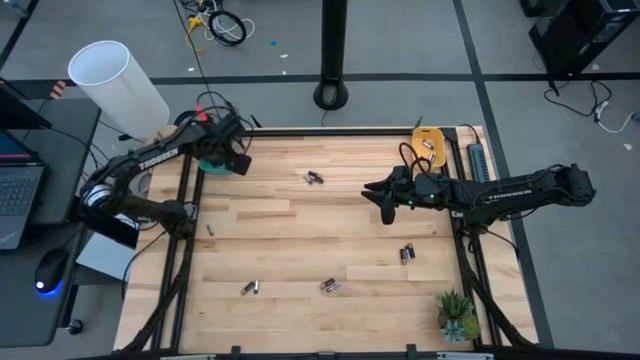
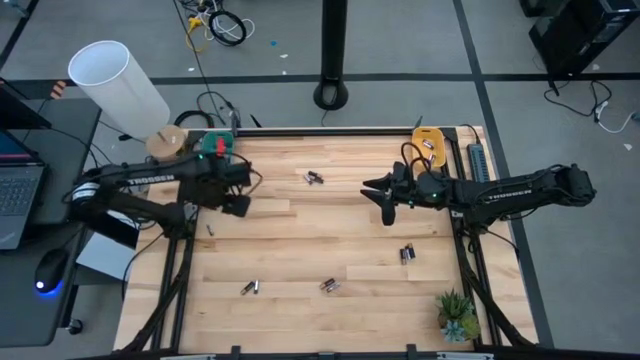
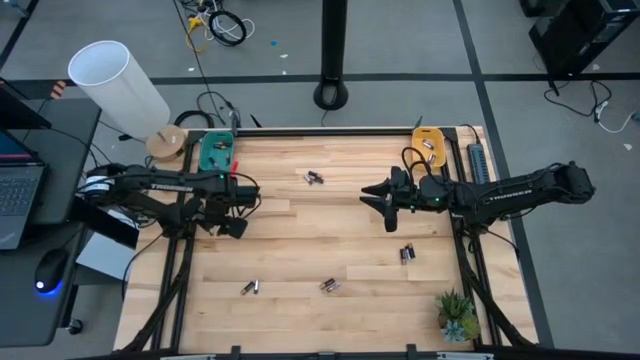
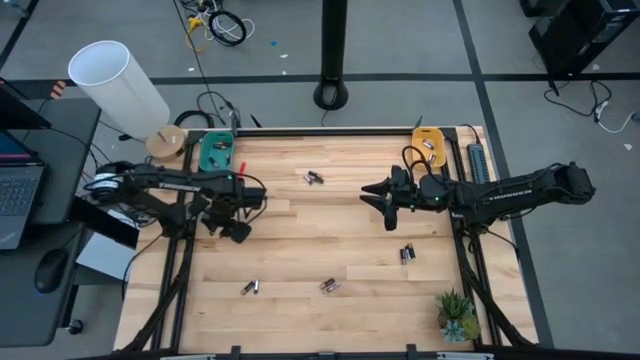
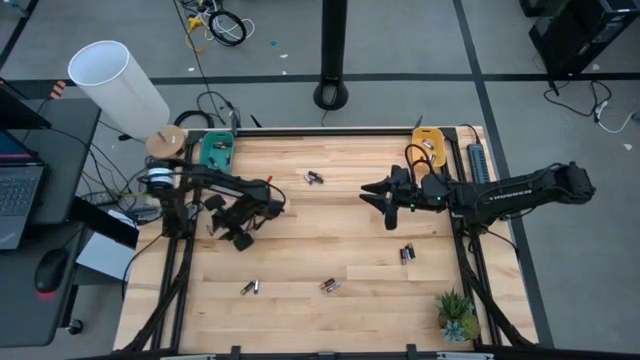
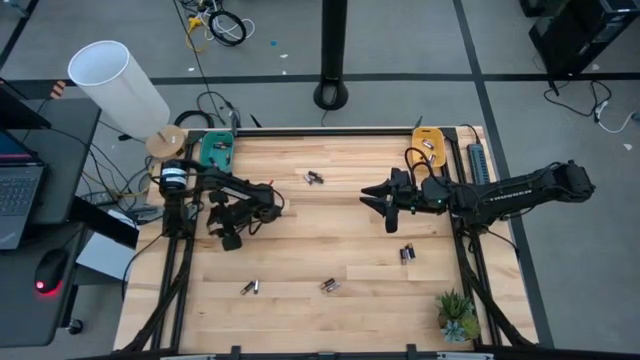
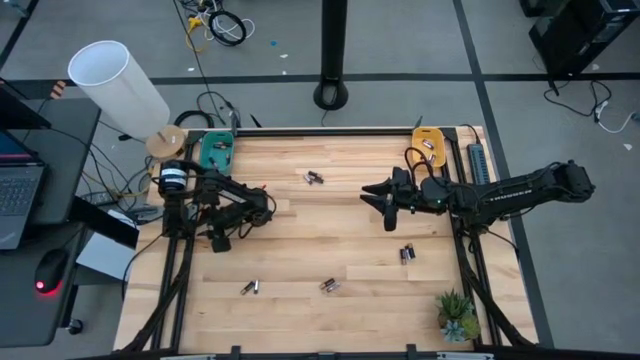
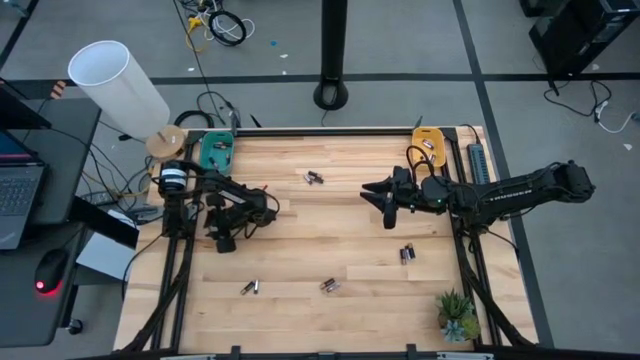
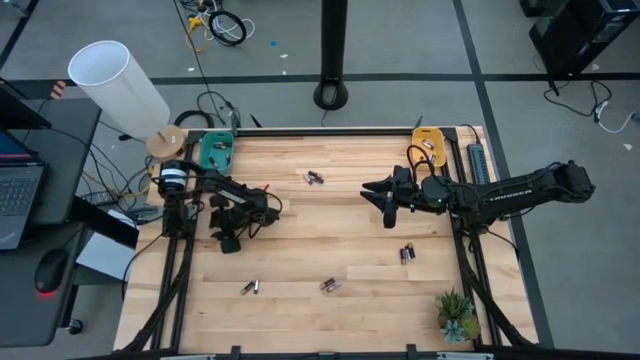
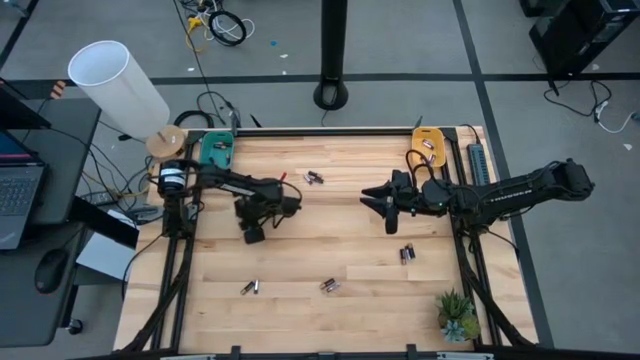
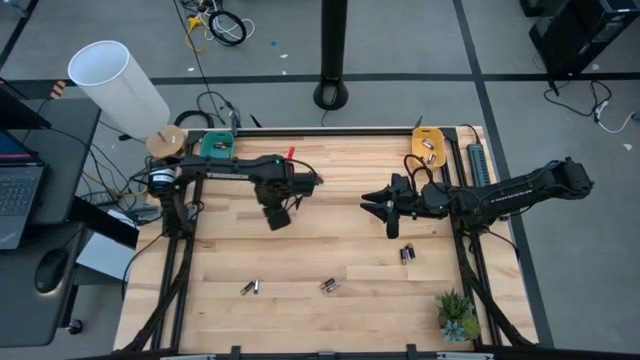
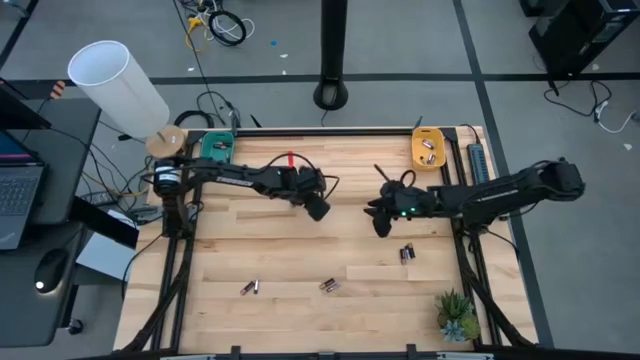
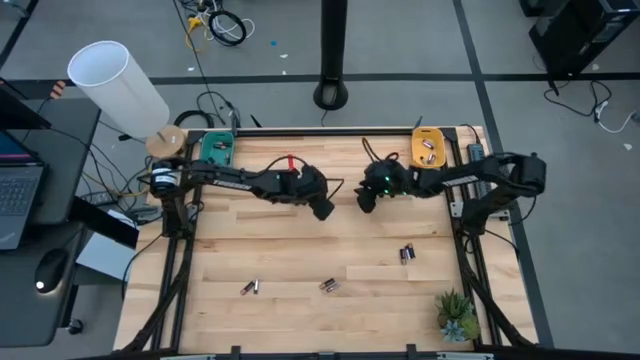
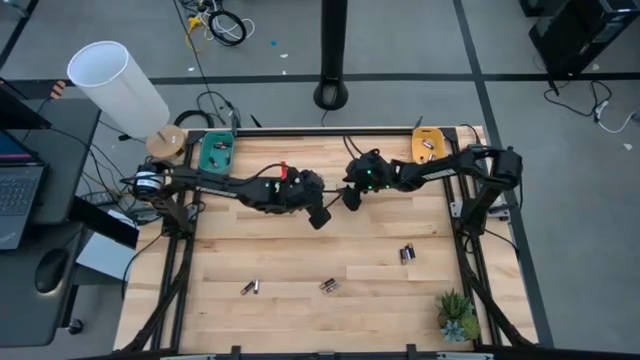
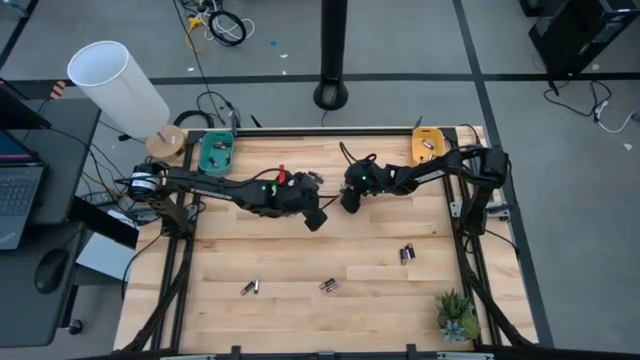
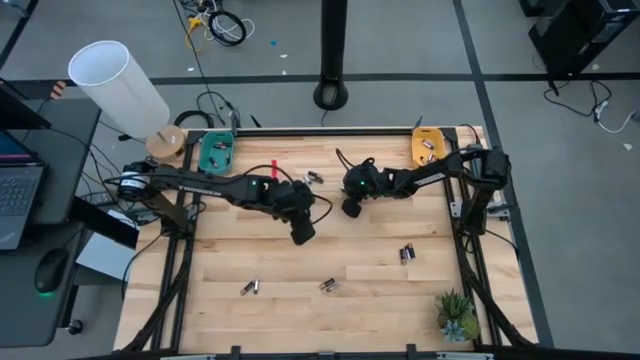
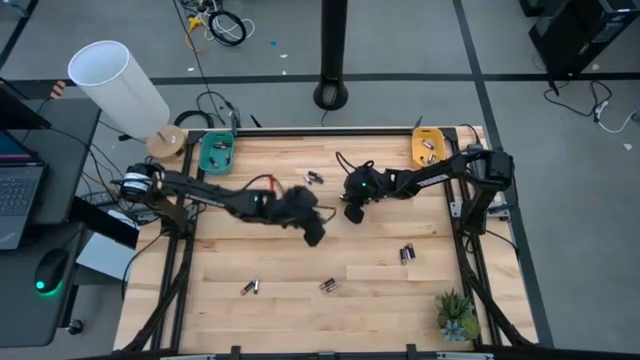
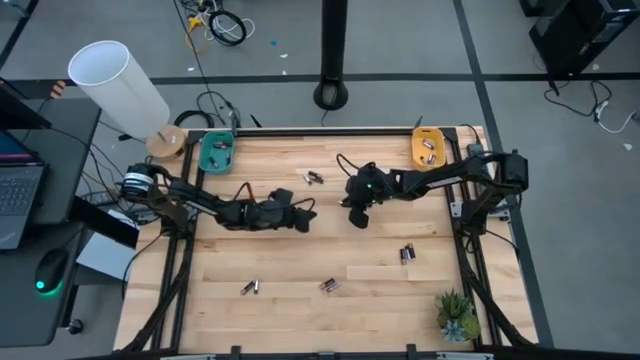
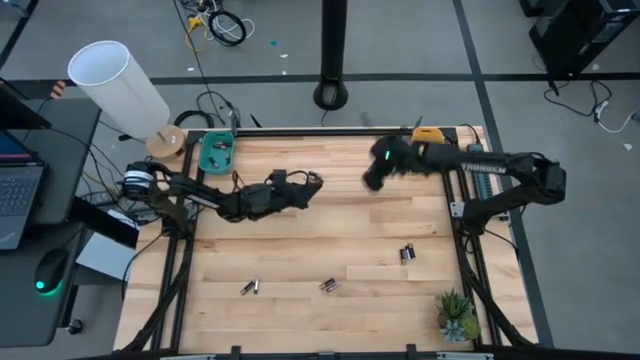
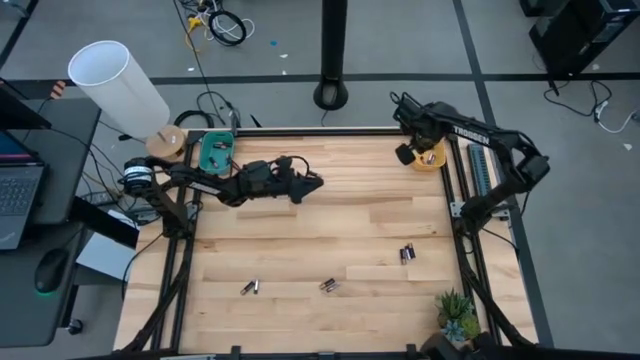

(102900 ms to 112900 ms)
Task: Sort batteries
Put the silver battery into the yellow bin

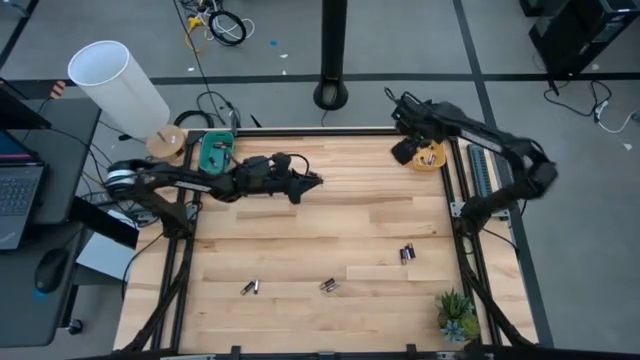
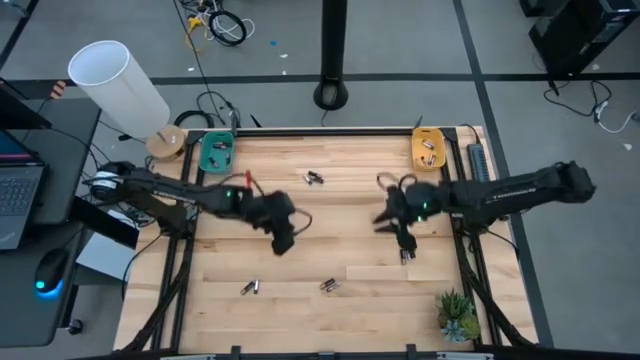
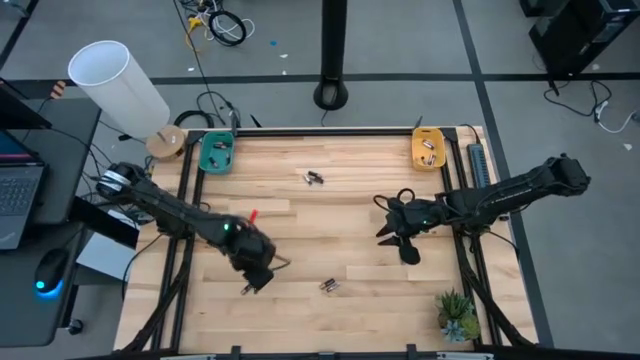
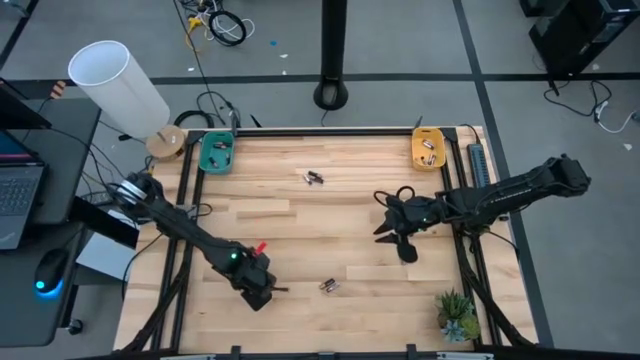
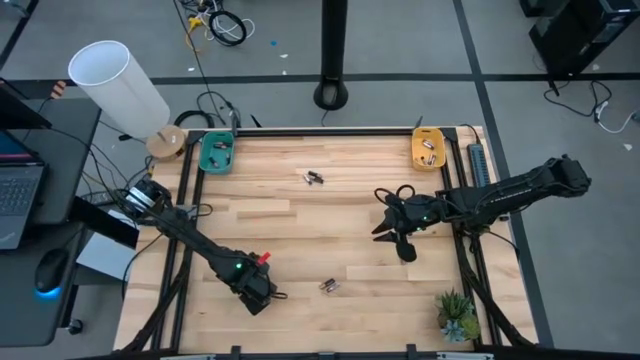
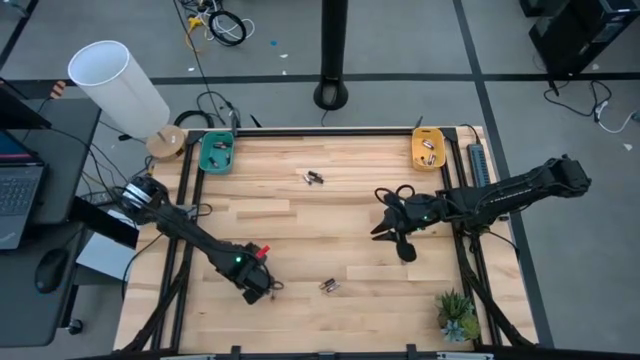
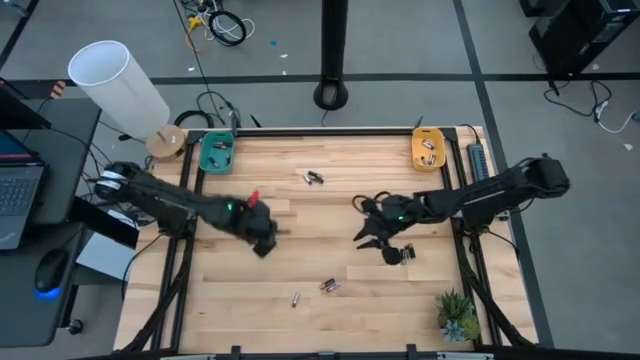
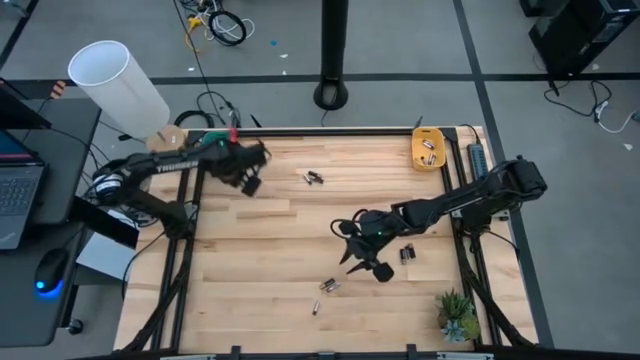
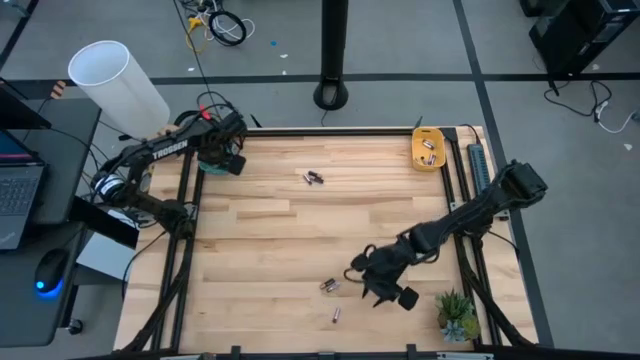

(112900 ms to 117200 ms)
Put the black battery into the blue bin

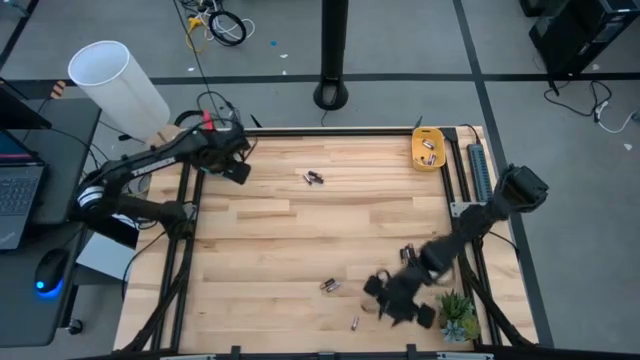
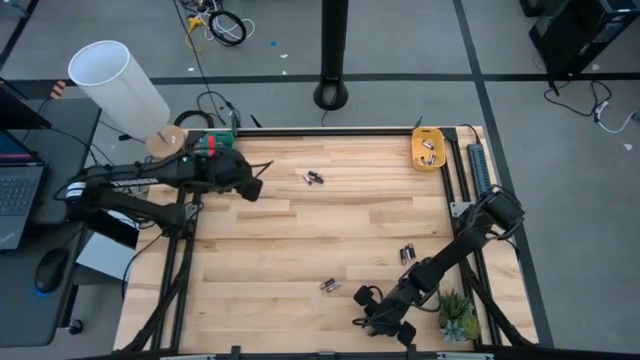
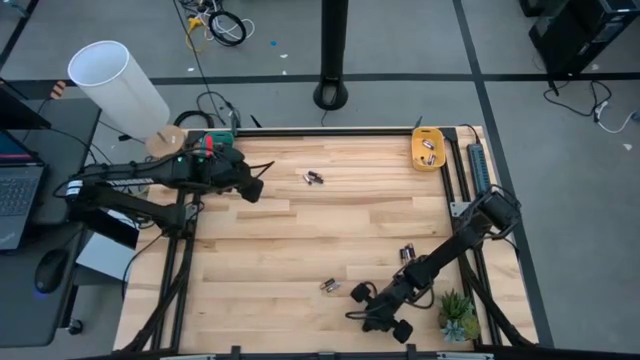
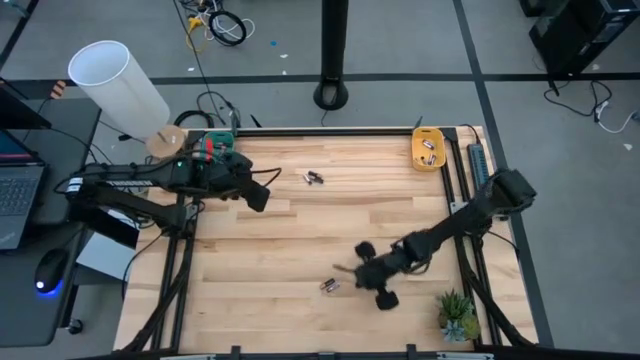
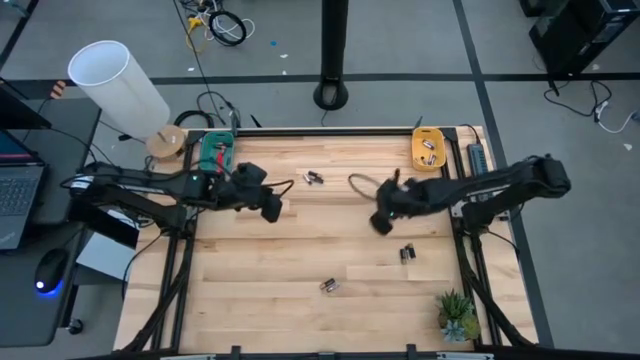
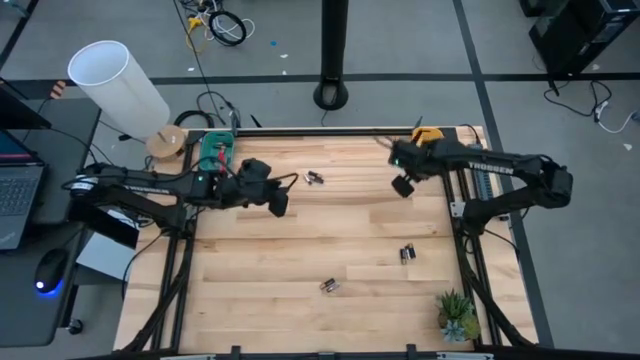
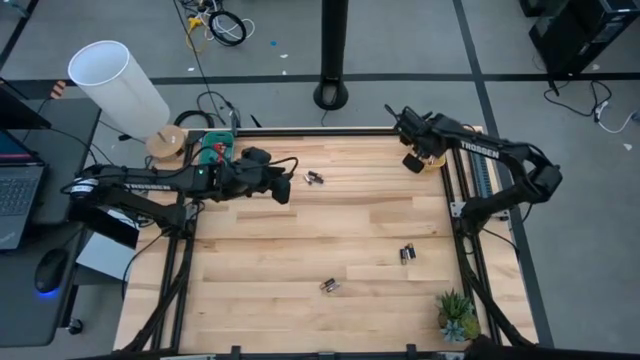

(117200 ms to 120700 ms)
Put the silver battery into the yellow bin

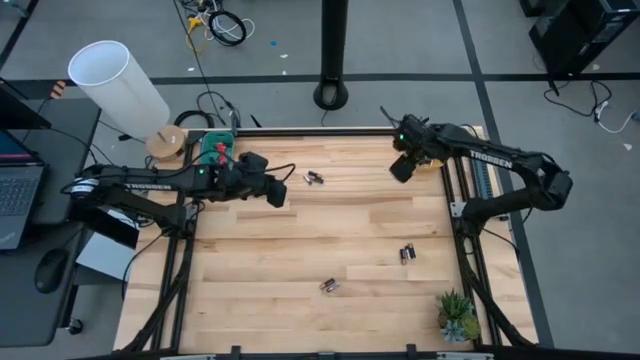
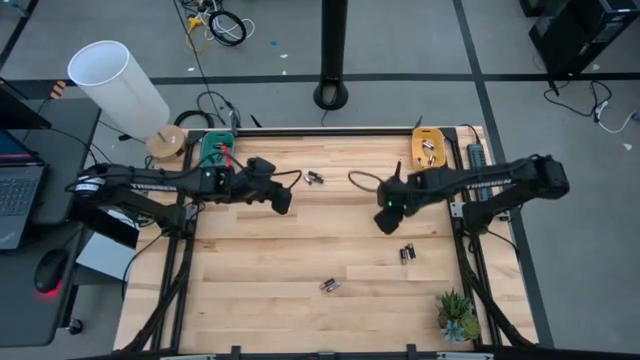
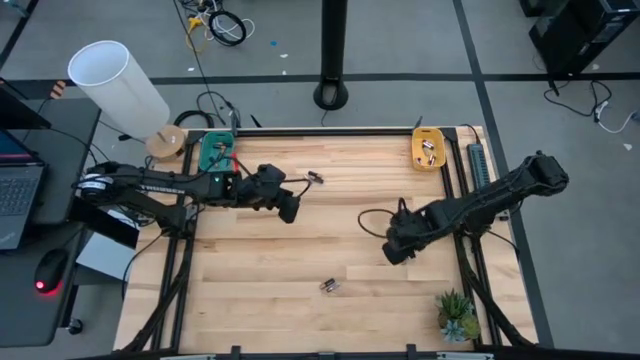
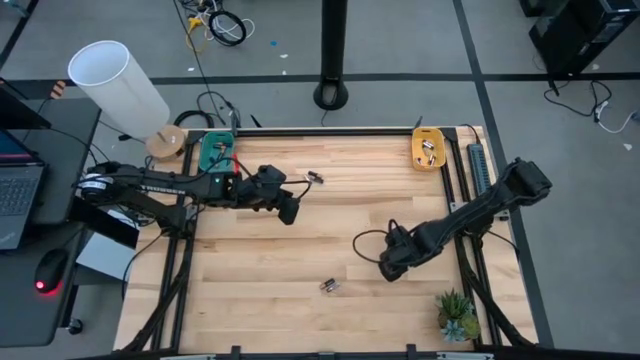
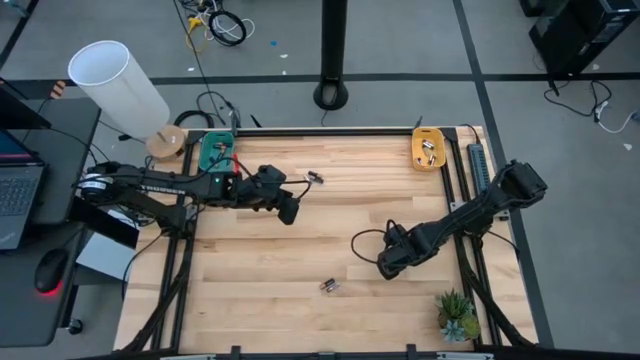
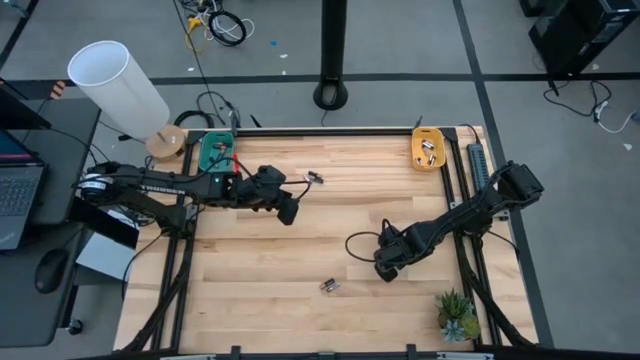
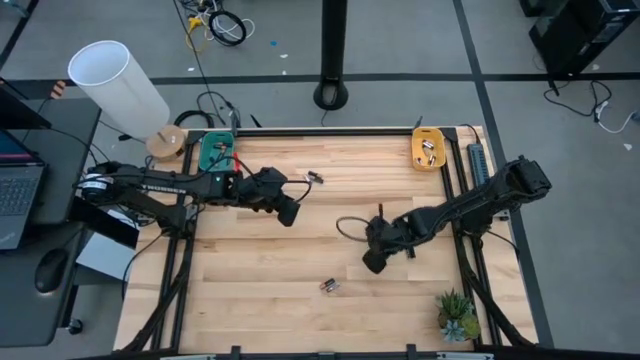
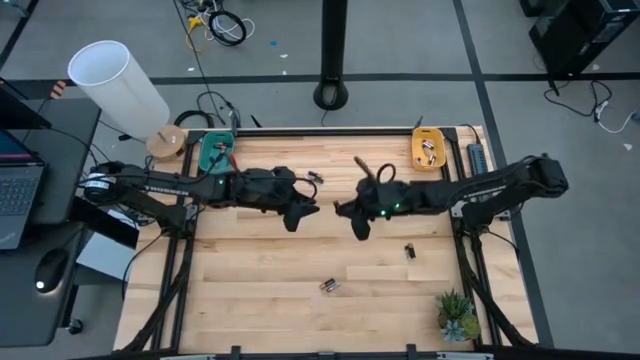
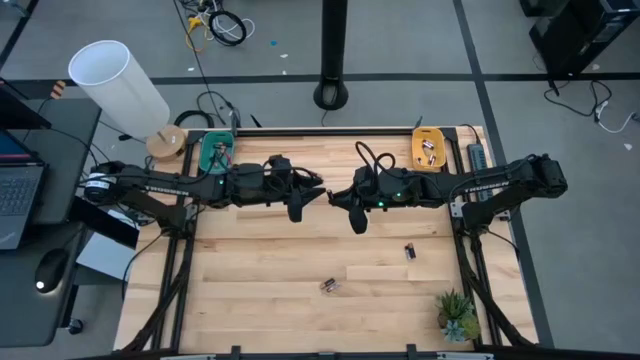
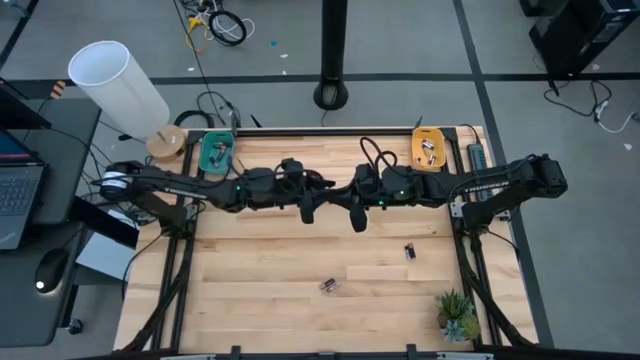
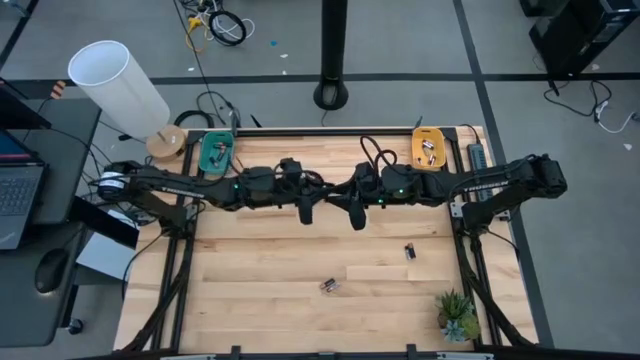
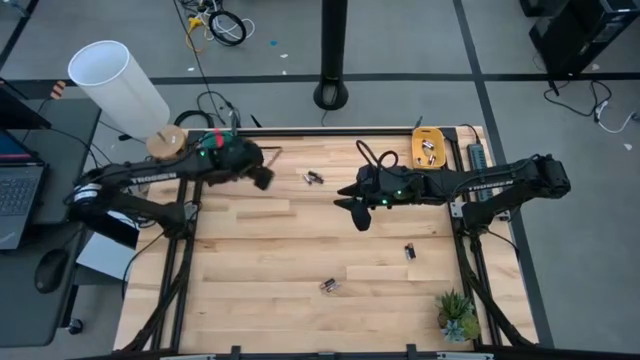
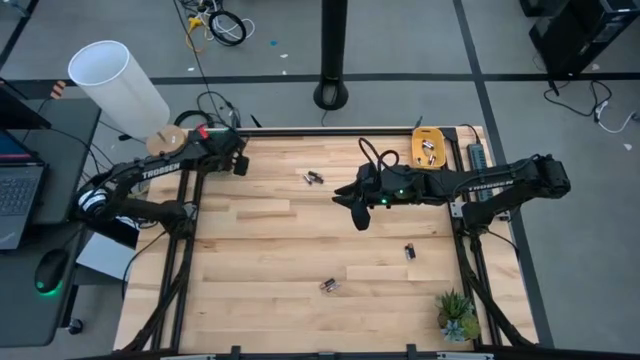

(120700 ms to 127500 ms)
Put the black battery into the blue bin
